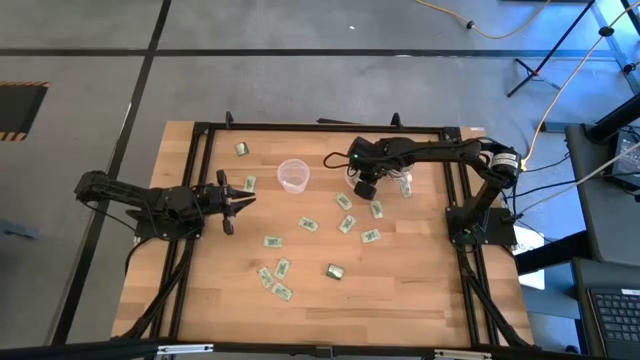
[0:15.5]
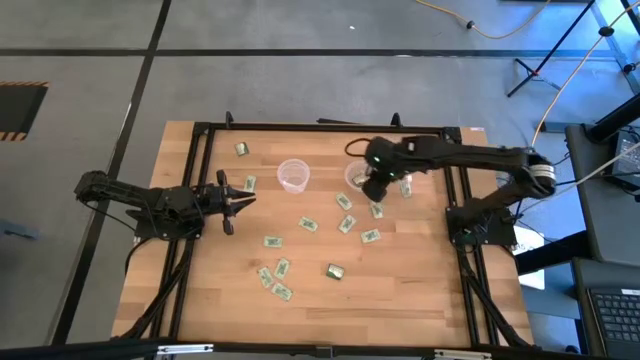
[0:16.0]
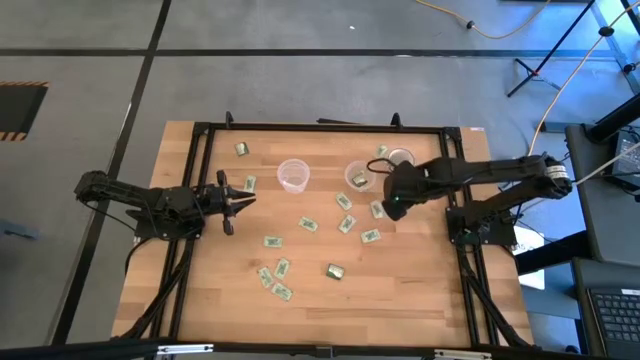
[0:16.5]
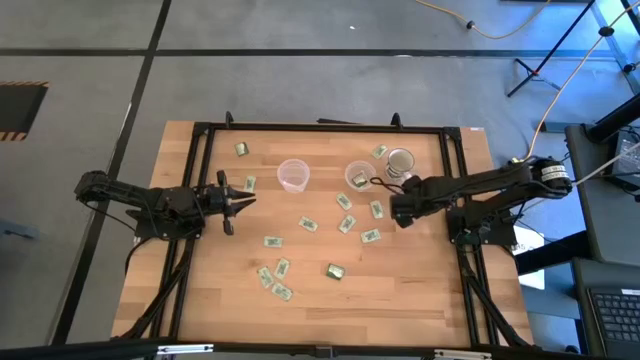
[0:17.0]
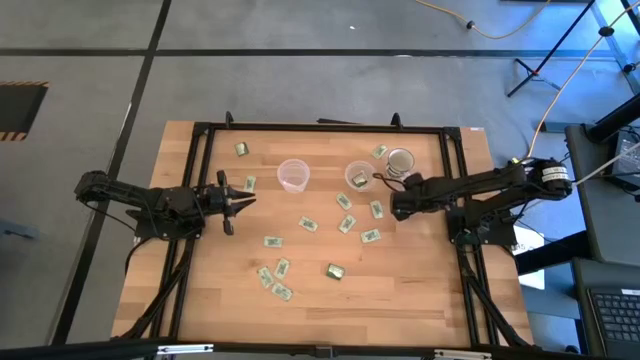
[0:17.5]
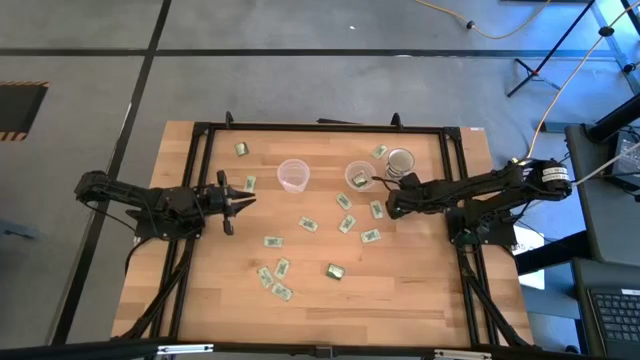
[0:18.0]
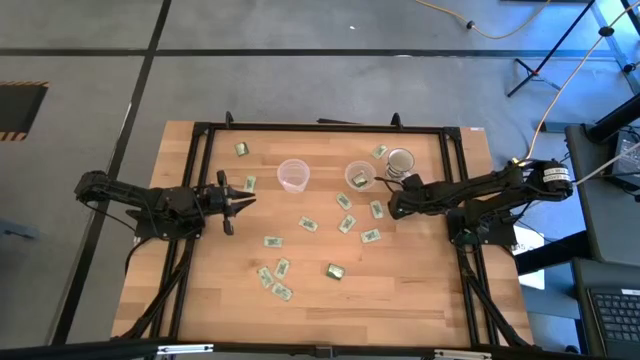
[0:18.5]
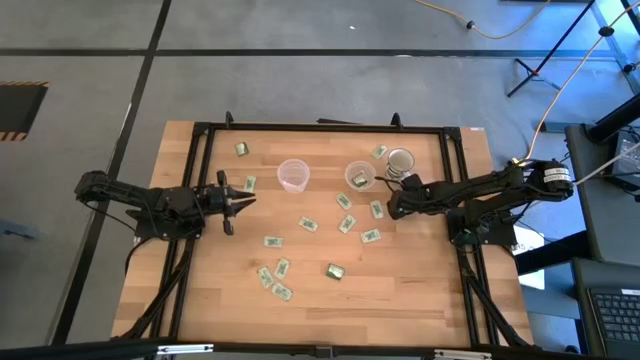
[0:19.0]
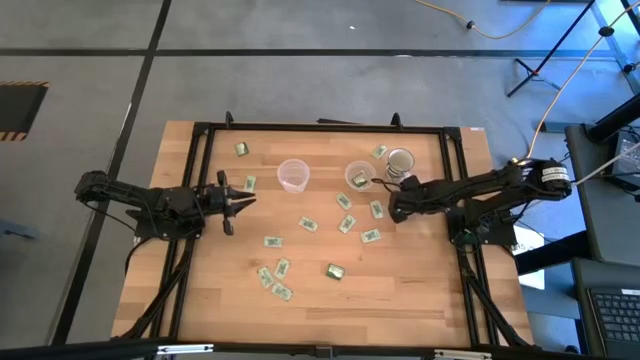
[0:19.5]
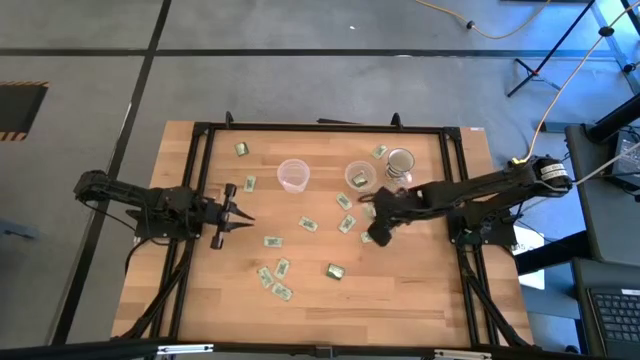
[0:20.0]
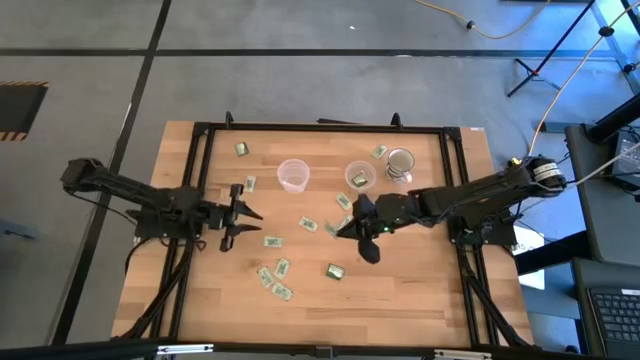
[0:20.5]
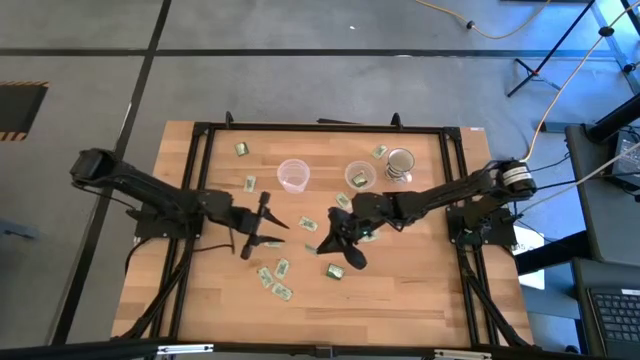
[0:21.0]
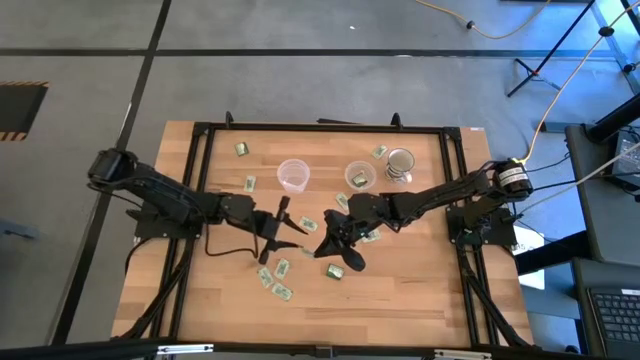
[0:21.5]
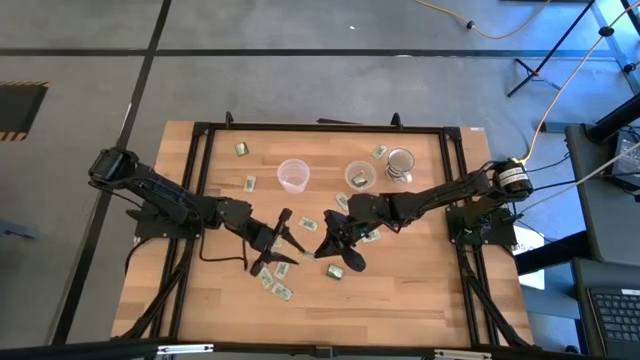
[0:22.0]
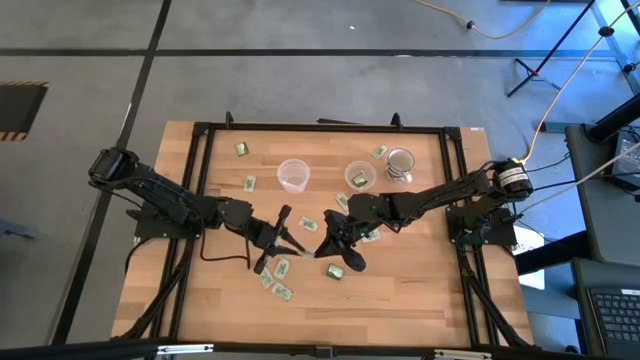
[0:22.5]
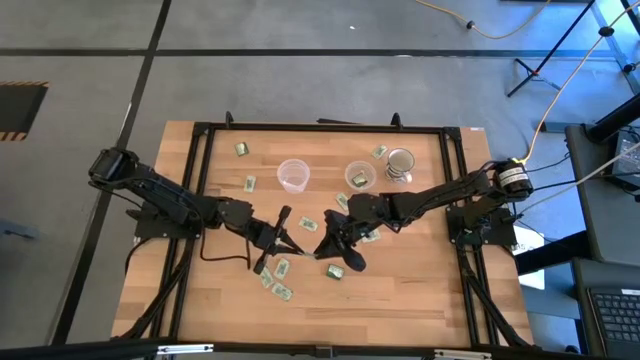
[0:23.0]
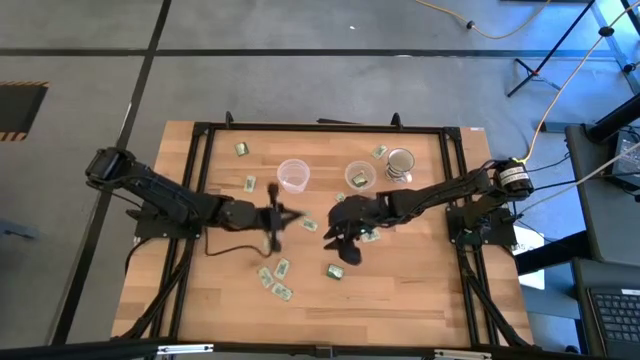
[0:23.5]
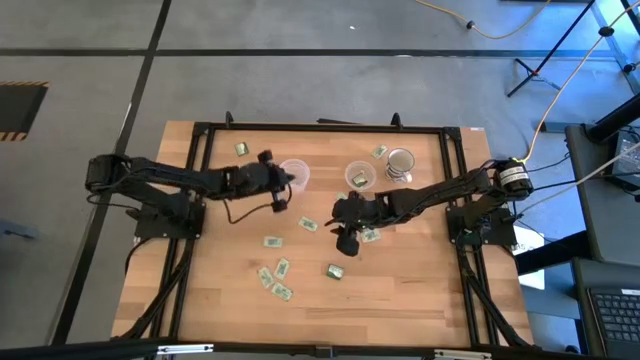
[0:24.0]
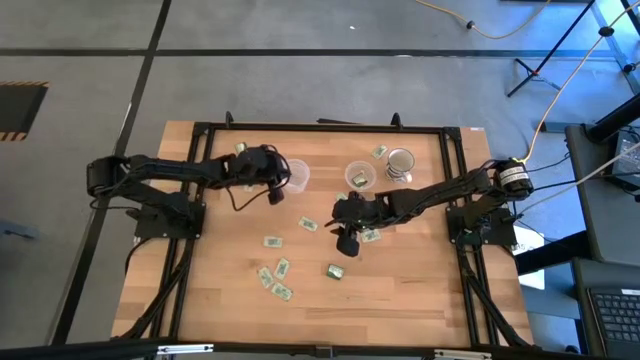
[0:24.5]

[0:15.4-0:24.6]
Task: Pick and place Stevia / Truvia into bins
Put the white stevia packet into the large transparent container

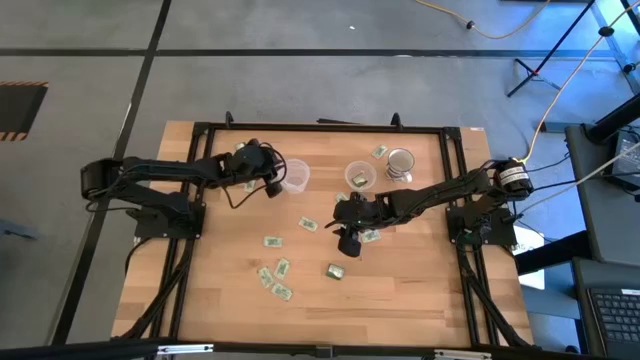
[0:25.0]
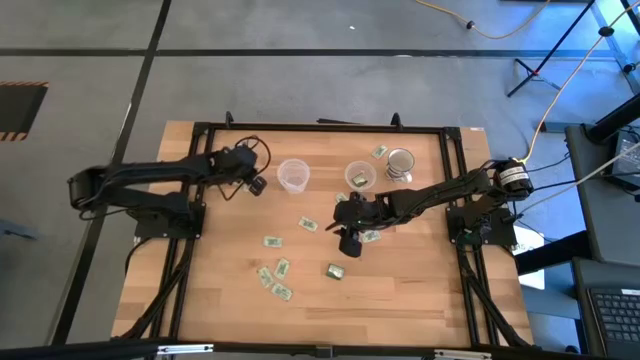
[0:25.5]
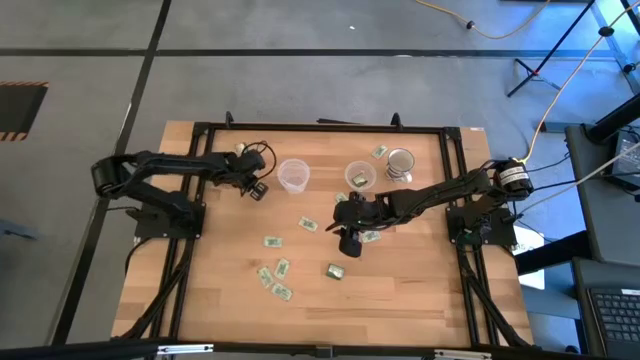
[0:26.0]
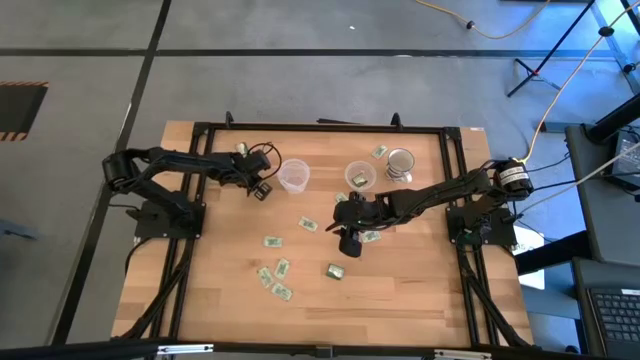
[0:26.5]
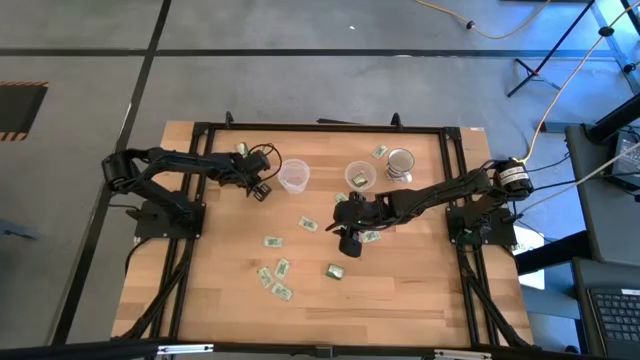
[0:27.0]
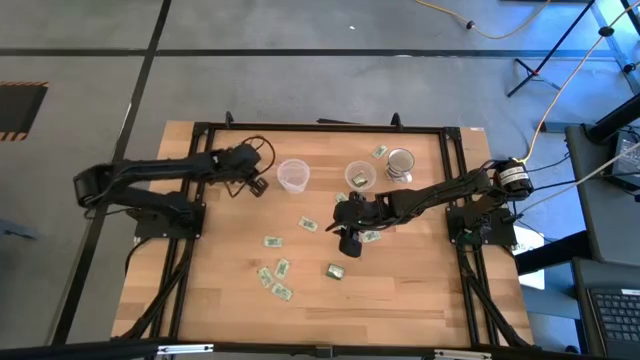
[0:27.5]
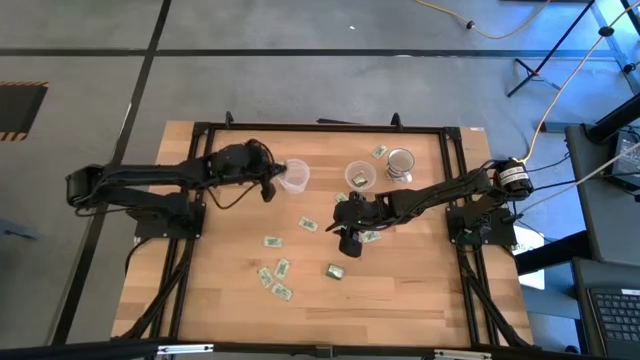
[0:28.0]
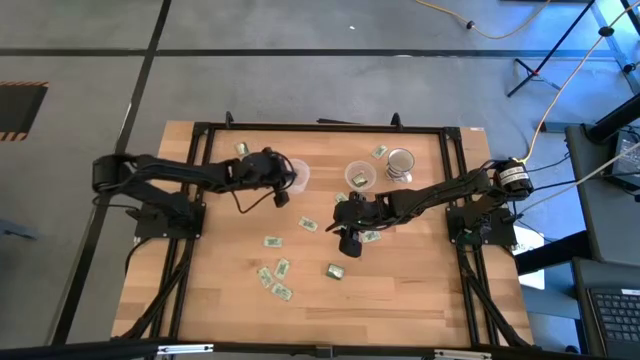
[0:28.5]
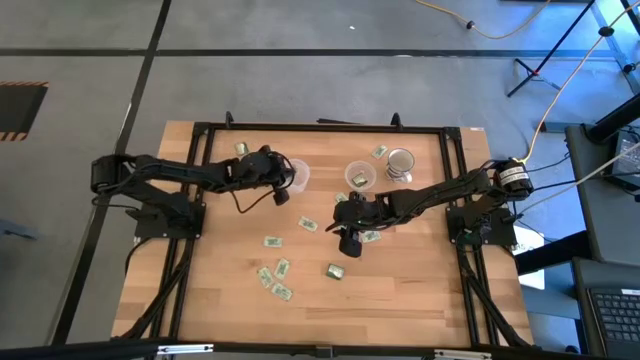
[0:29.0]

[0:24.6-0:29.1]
Put the white stevia packet into the large transparent container

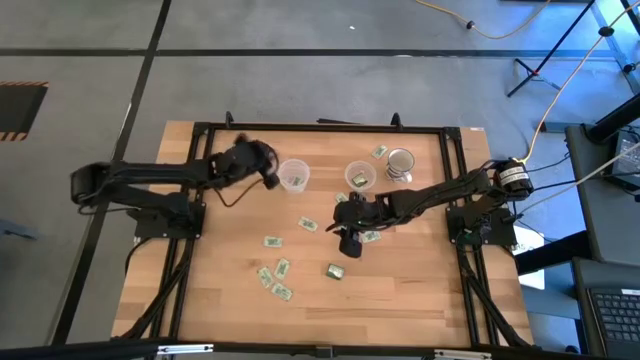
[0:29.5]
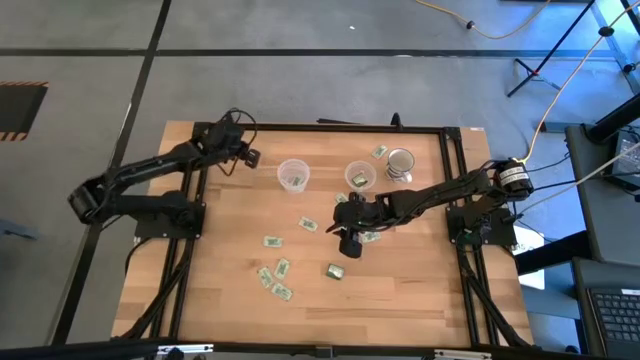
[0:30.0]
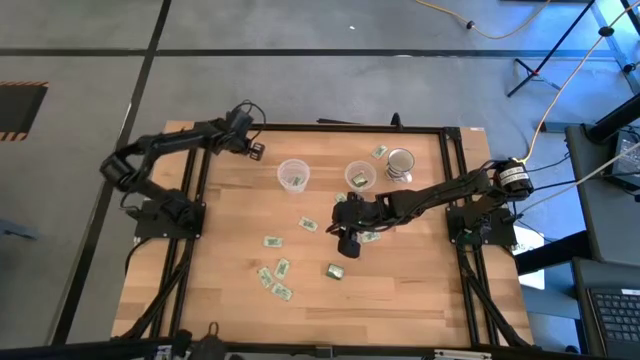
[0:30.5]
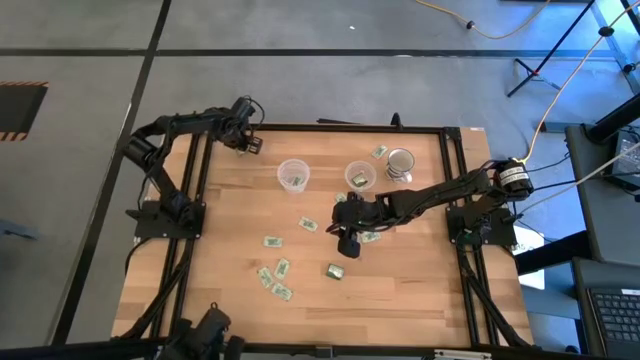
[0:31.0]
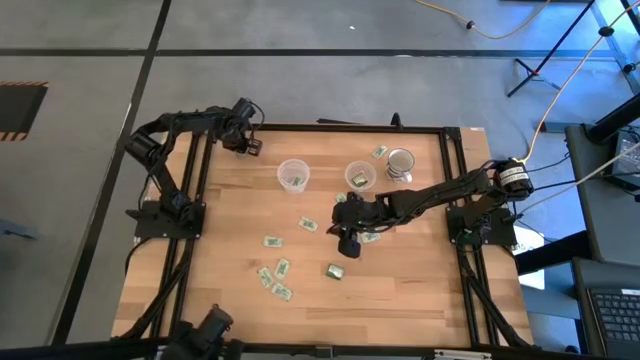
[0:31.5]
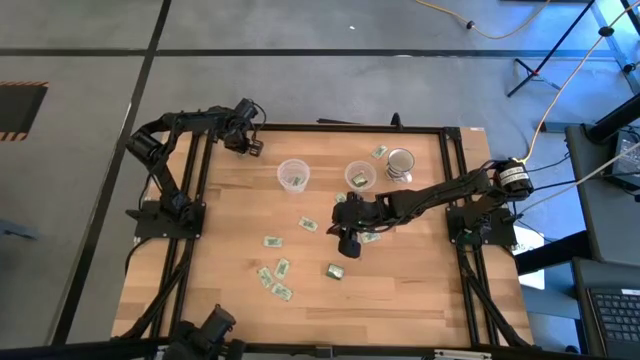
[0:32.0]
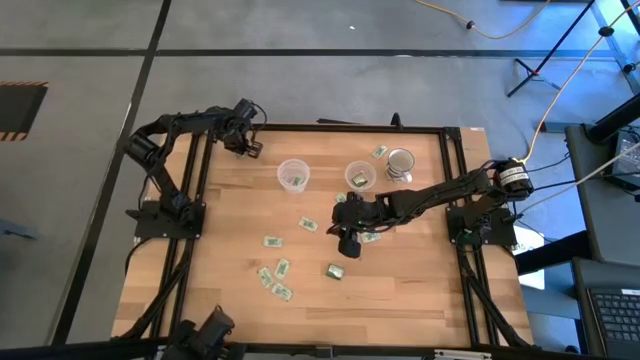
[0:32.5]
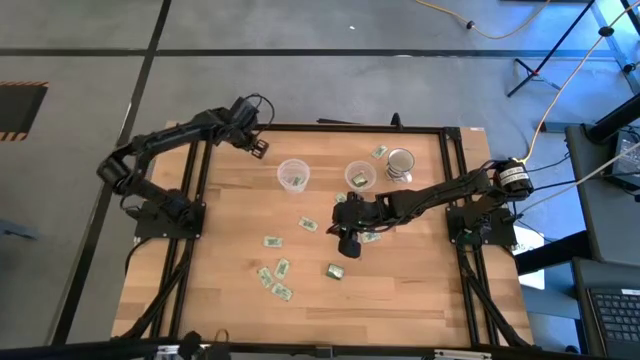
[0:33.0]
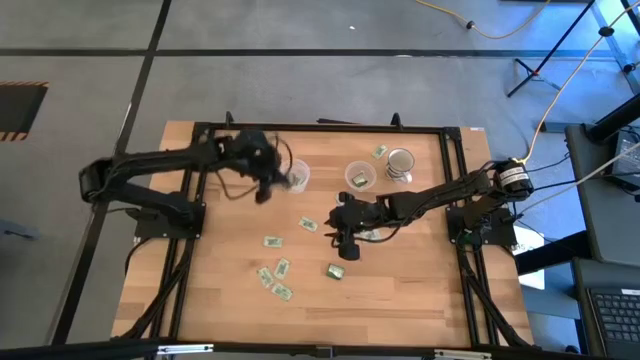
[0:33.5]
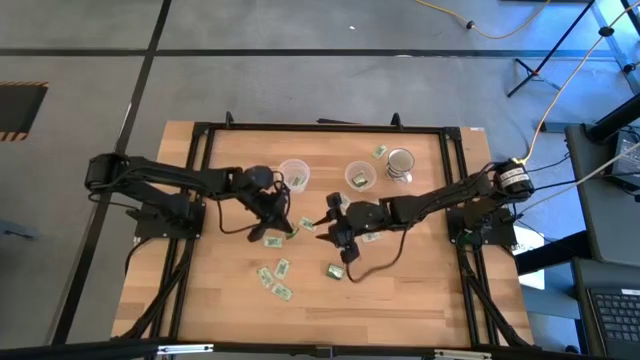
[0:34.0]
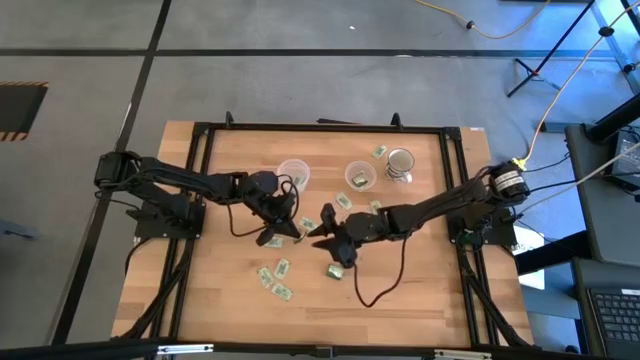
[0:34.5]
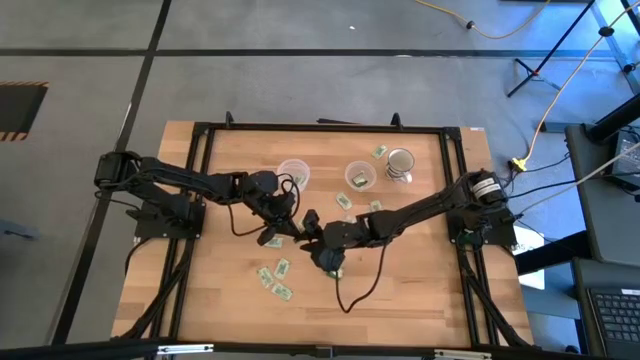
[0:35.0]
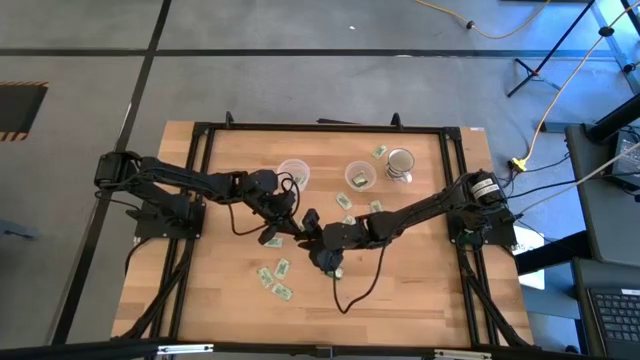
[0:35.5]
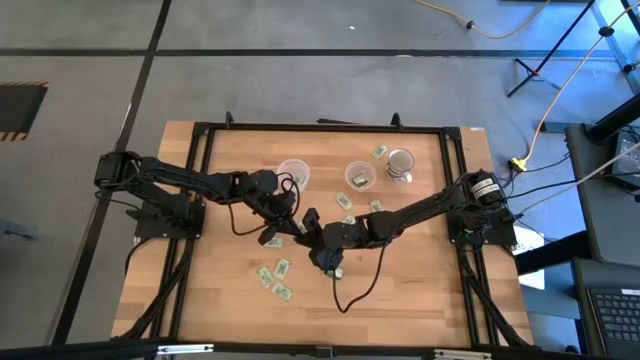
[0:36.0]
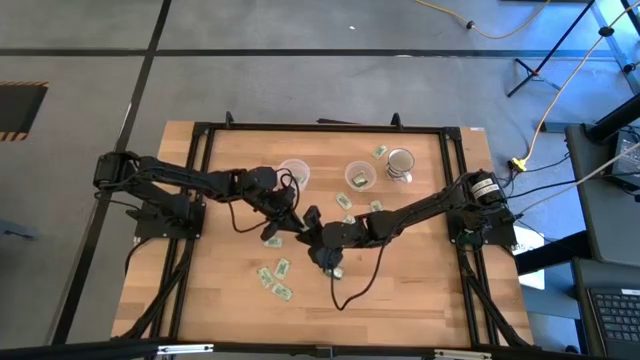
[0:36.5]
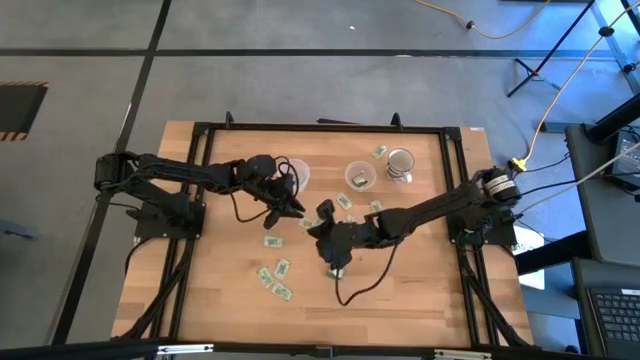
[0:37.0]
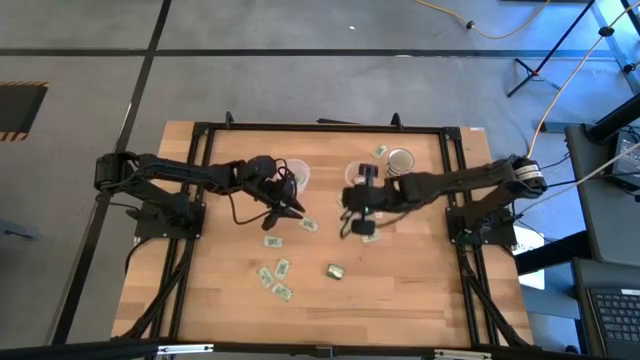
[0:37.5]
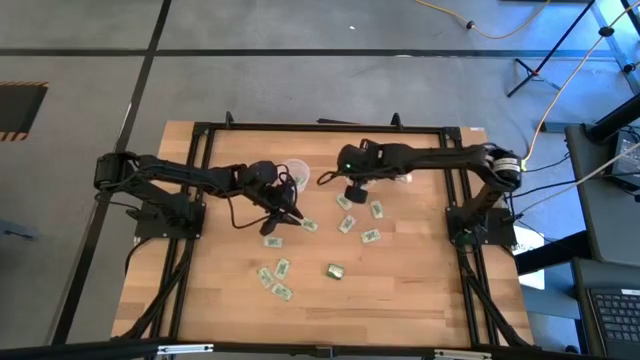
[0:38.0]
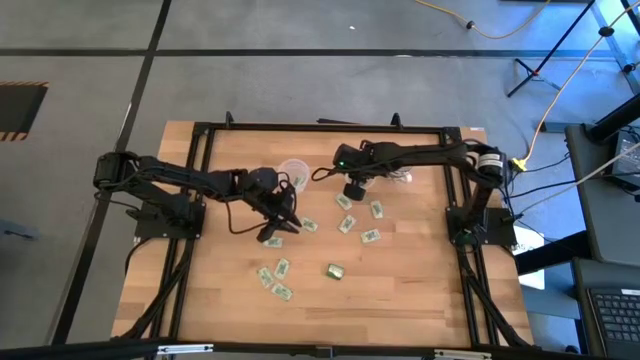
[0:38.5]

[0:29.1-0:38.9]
Put the green truvia packet into the small transparent container
